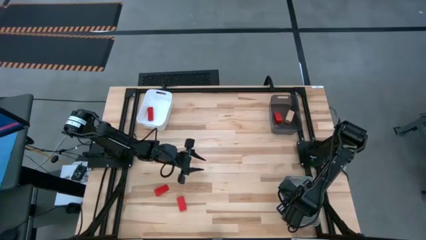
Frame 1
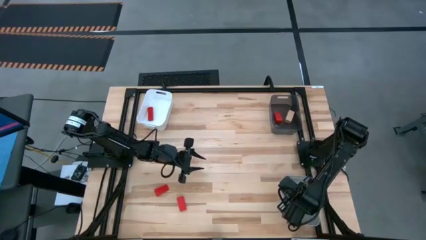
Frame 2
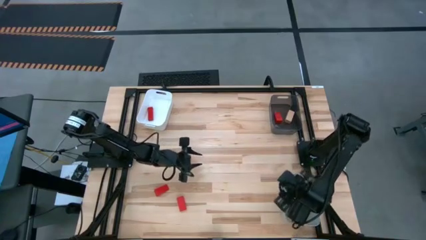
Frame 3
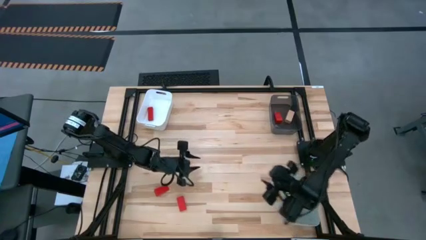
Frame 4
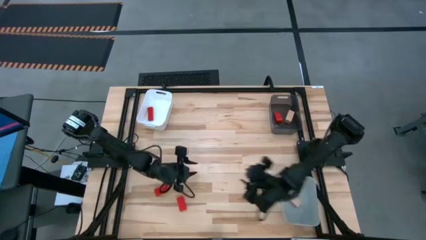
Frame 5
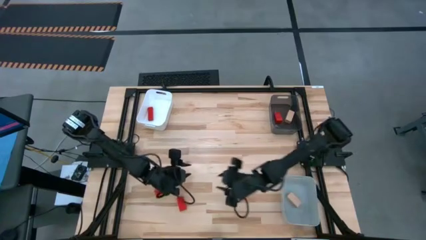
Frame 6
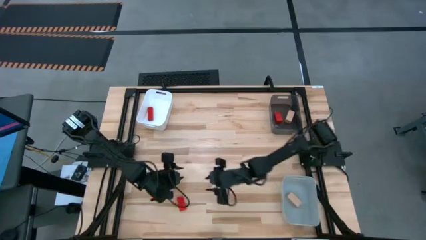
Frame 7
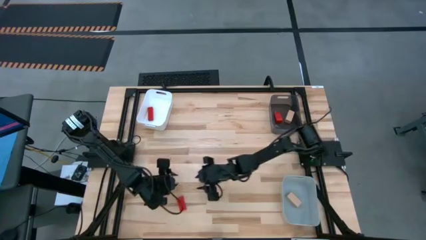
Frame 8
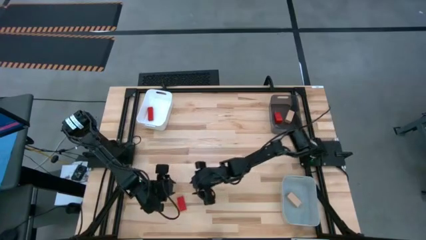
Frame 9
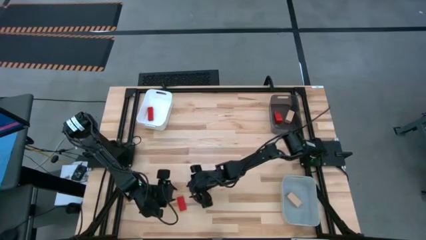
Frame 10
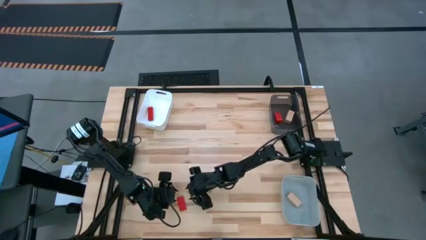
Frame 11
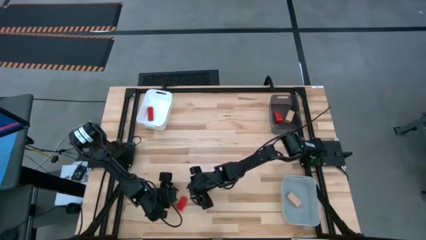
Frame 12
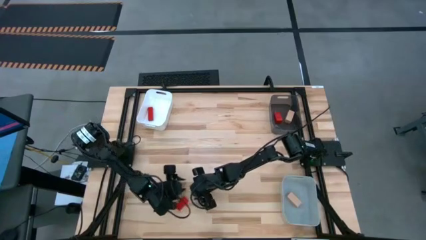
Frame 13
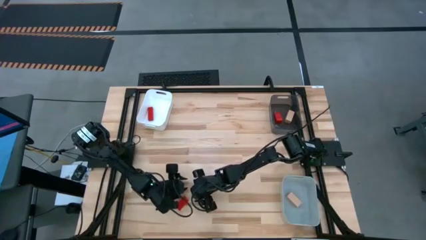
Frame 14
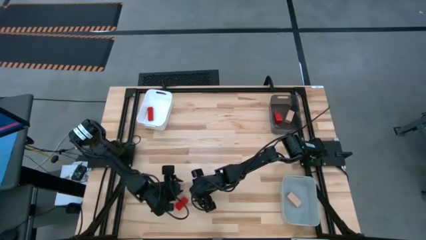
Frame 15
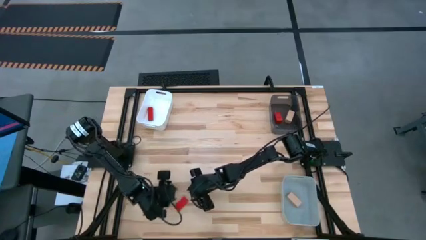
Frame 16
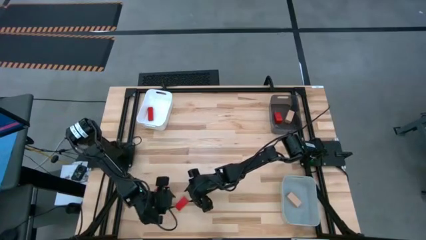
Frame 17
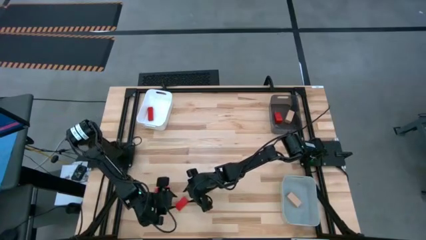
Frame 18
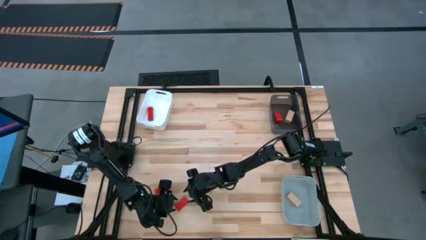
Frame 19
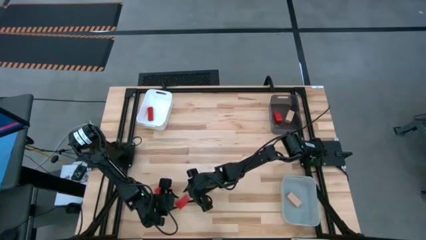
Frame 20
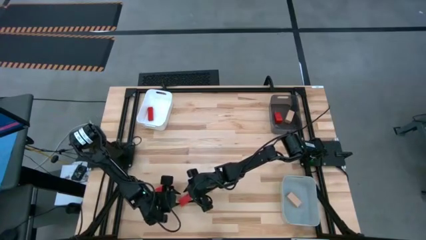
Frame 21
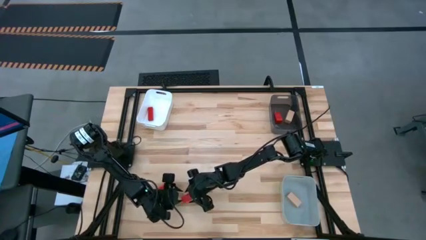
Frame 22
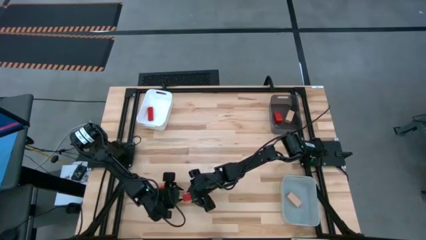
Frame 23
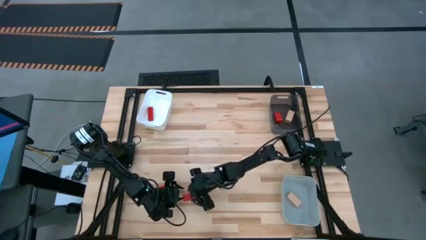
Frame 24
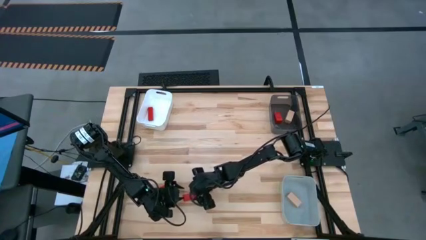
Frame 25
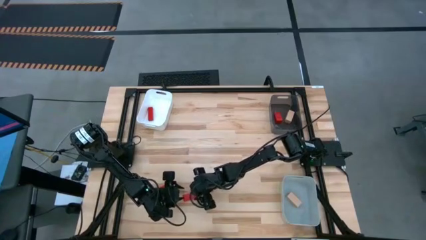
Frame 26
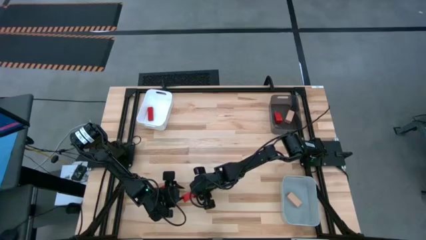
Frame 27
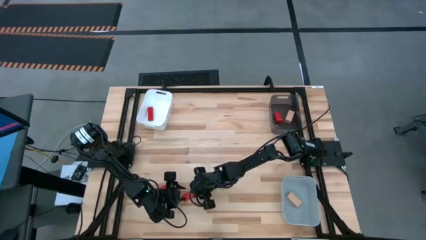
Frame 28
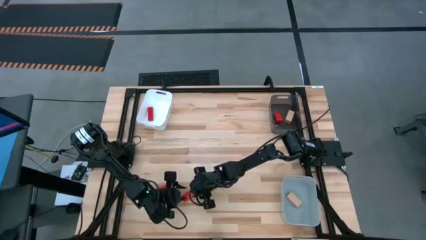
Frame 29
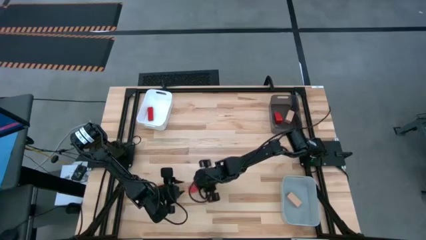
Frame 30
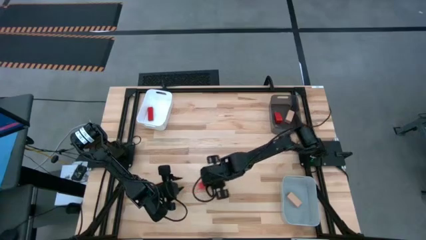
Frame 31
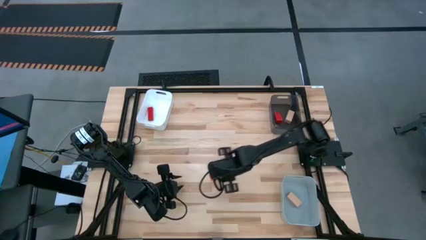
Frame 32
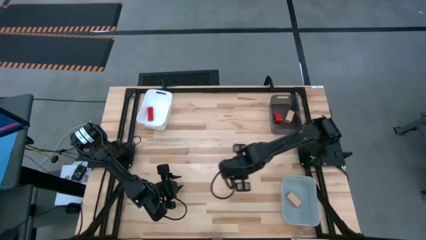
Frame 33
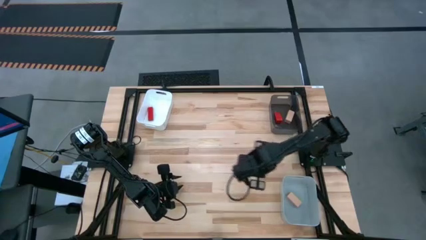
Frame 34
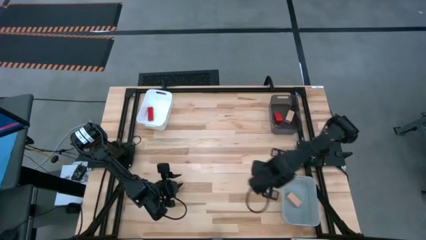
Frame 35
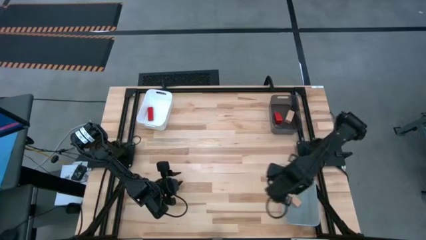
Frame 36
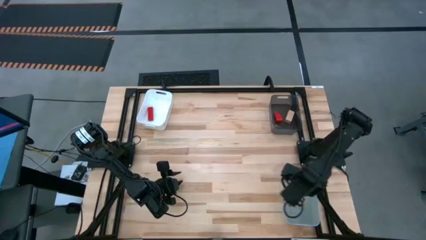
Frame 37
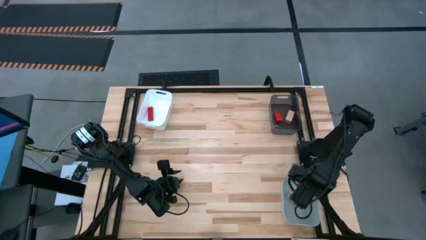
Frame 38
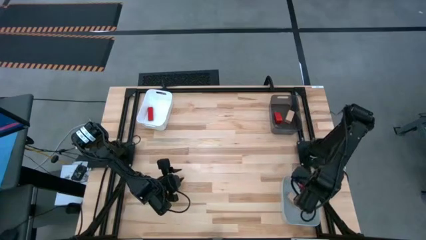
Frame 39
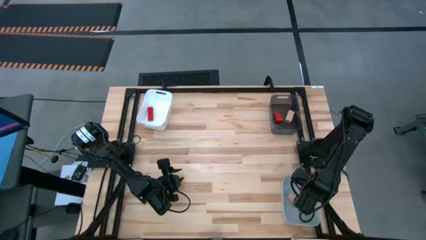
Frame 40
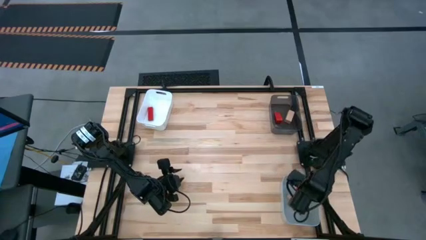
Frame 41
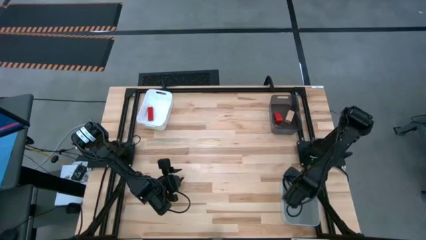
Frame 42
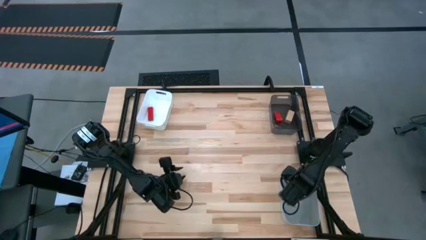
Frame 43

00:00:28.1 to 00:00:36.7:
Task: Sort & place blocks by color
Put the red block into the gray bin

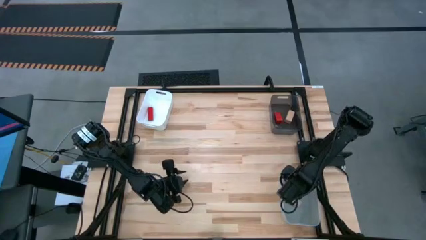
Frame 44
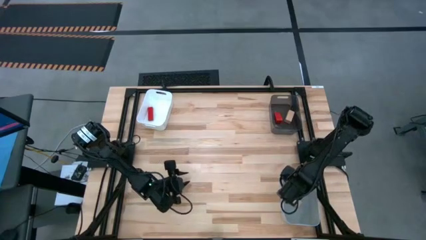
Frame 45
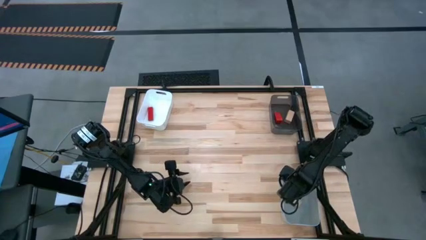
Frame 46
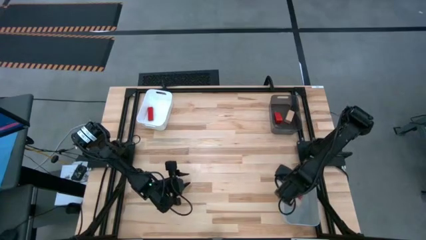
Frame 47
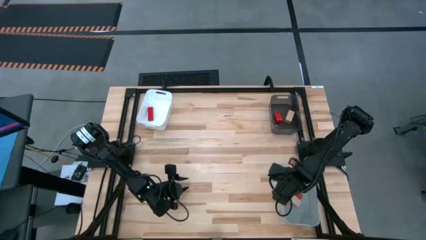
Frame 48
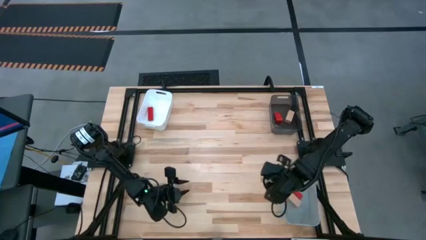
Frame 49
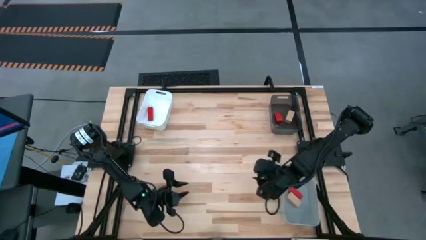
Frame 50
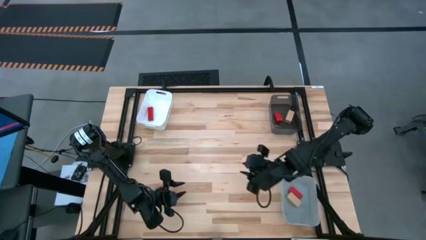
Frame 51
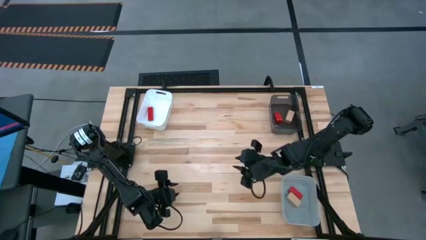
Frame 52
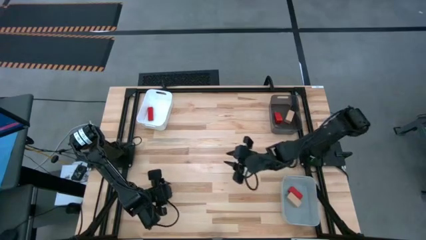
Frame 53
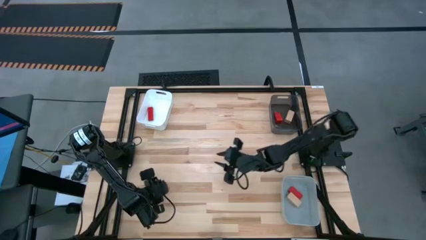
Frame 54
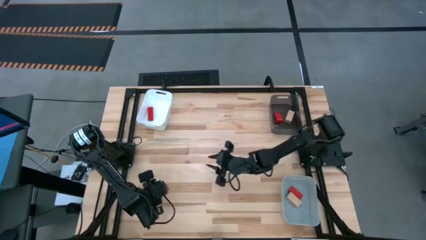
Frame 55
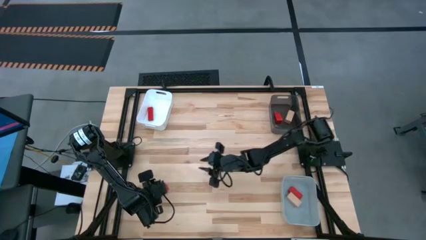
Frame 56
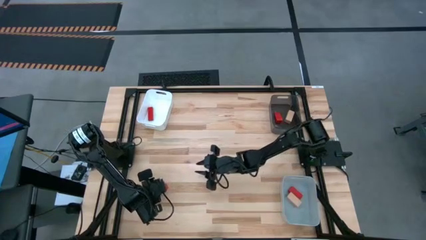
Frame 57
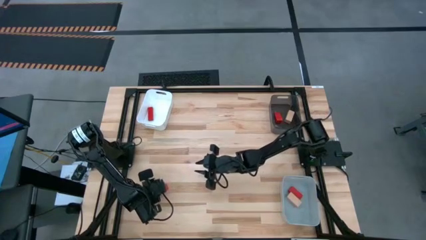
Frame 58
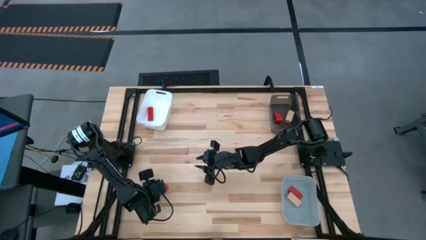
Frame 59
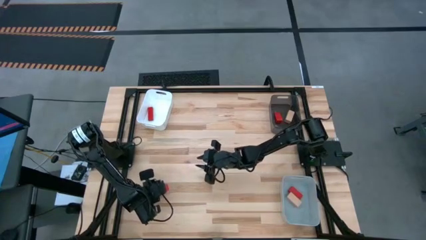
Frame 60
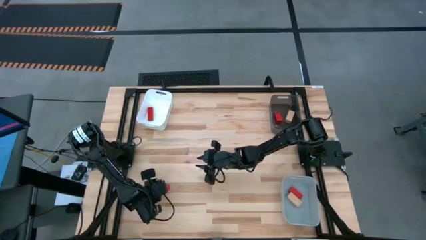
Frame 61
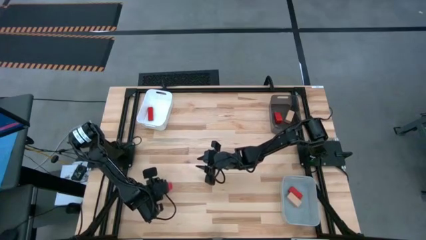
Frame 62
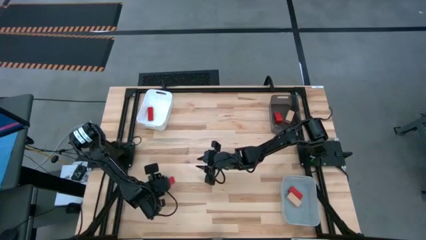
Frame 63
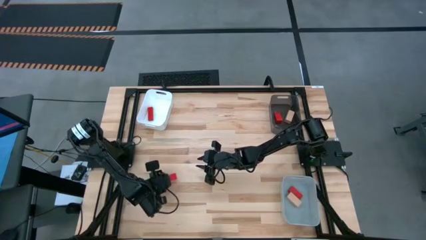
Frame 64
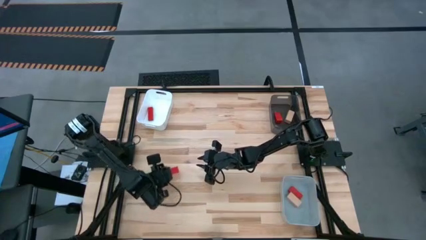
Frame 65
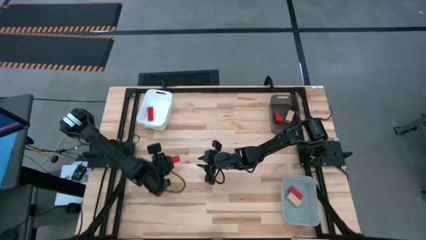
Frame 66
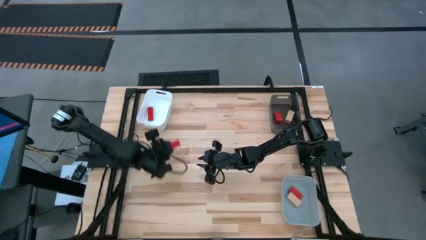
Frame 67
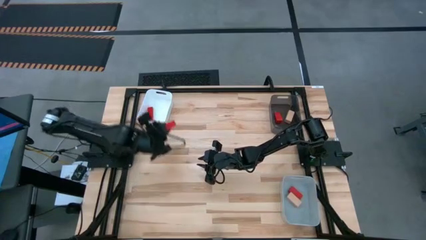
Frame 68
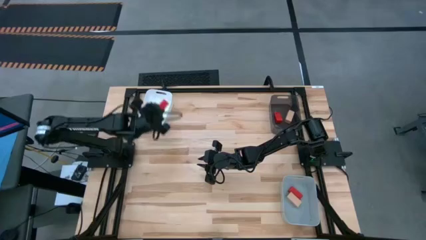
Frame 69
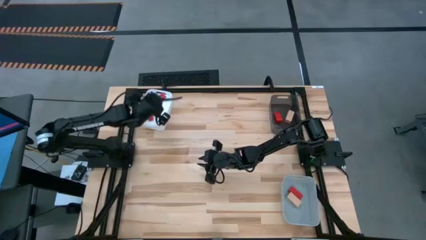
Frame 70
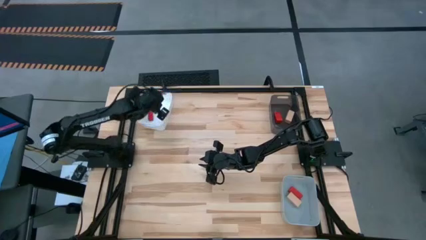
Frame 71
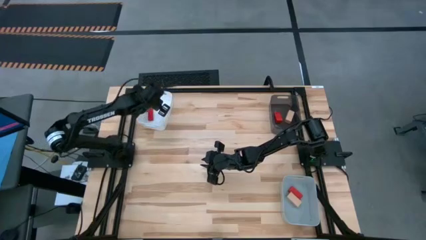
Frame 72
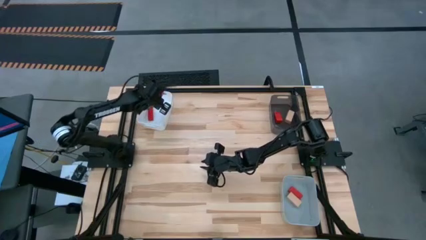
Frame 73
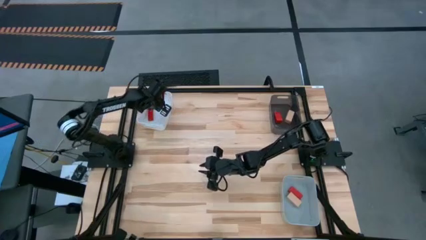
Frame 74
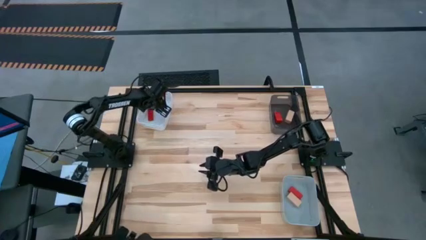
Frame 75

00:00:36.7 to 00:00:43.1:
Put the red block into the white bin
